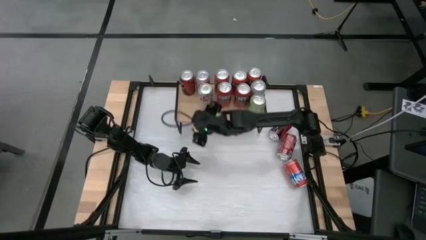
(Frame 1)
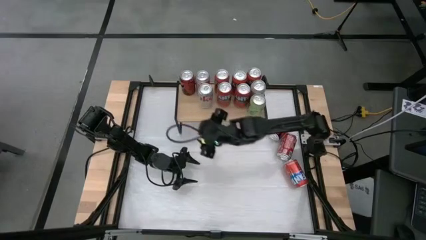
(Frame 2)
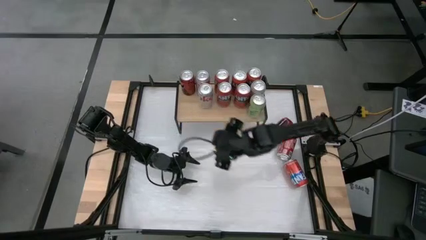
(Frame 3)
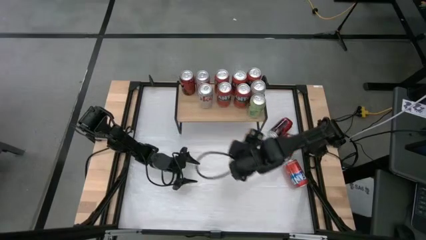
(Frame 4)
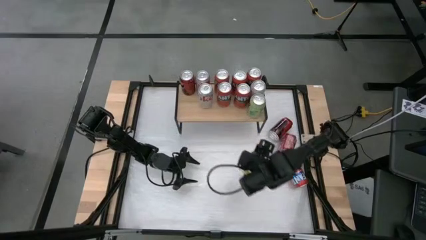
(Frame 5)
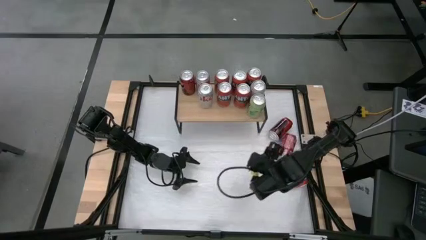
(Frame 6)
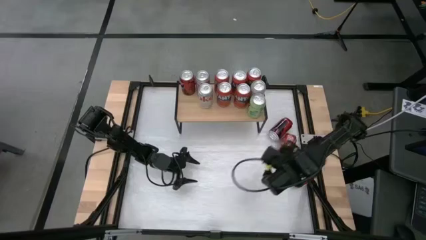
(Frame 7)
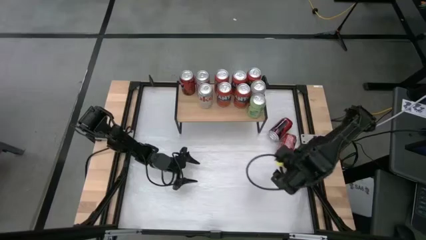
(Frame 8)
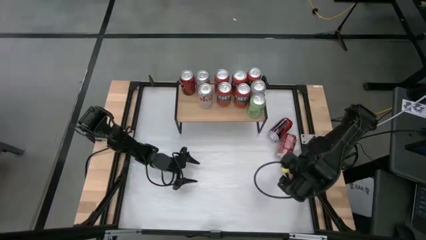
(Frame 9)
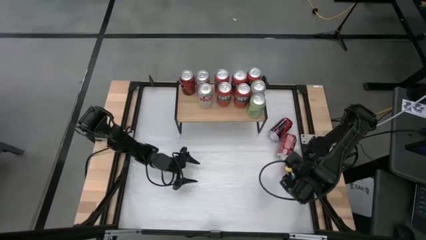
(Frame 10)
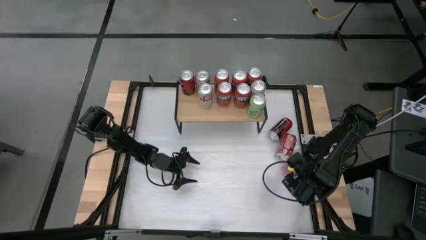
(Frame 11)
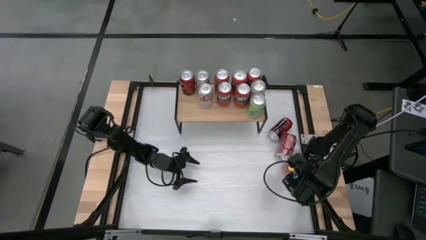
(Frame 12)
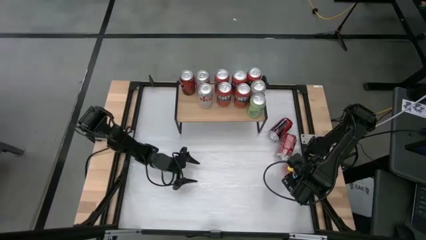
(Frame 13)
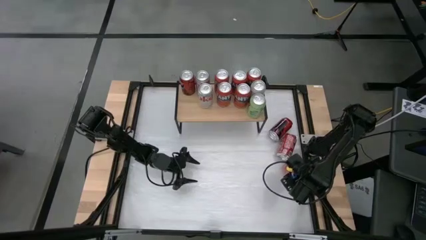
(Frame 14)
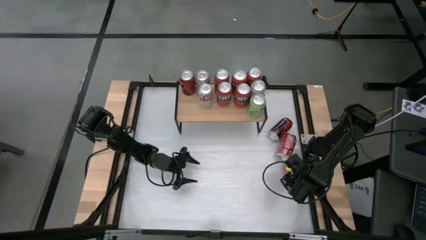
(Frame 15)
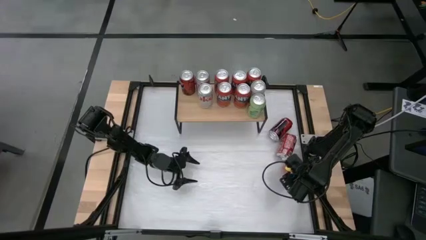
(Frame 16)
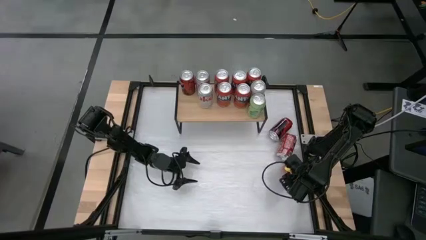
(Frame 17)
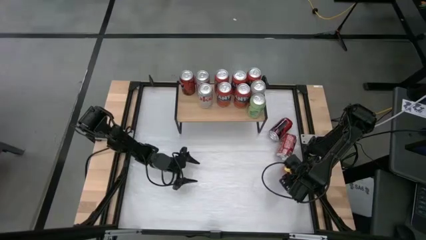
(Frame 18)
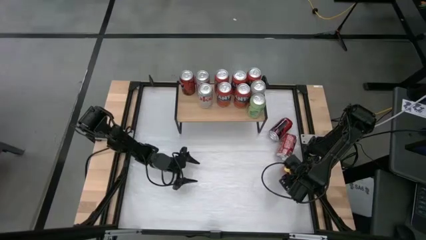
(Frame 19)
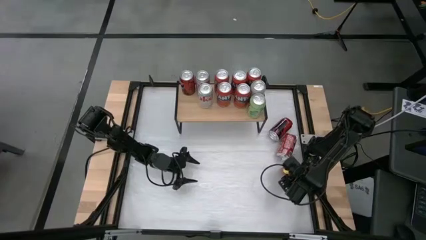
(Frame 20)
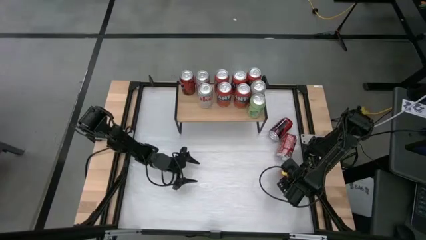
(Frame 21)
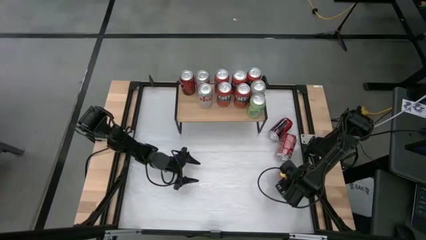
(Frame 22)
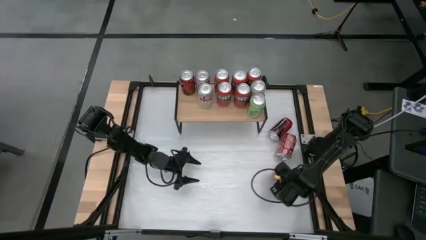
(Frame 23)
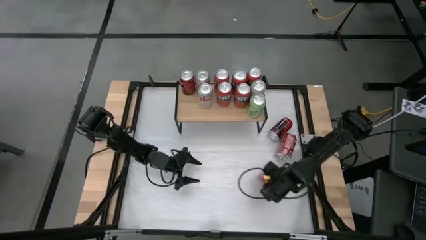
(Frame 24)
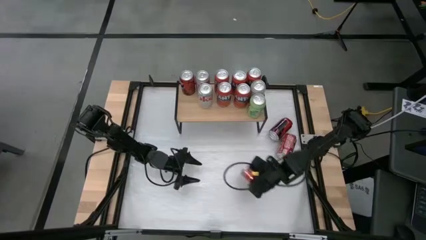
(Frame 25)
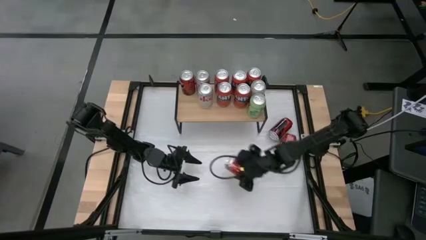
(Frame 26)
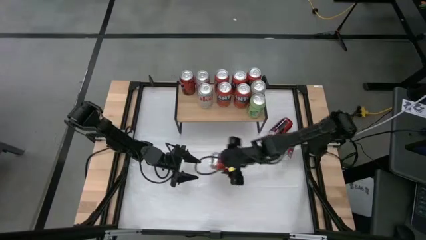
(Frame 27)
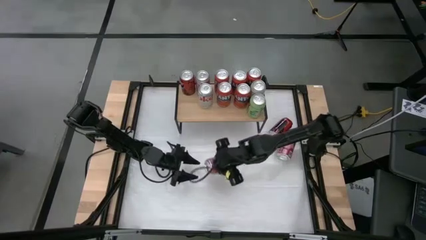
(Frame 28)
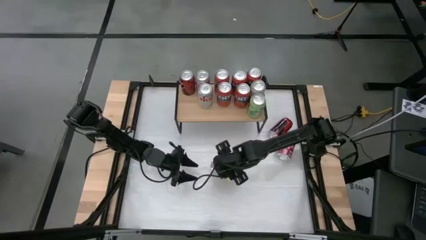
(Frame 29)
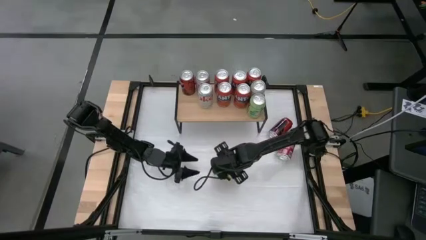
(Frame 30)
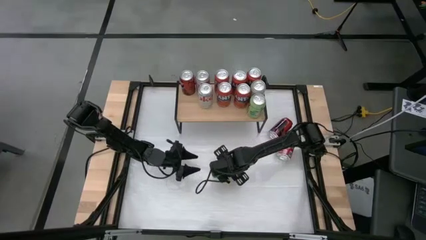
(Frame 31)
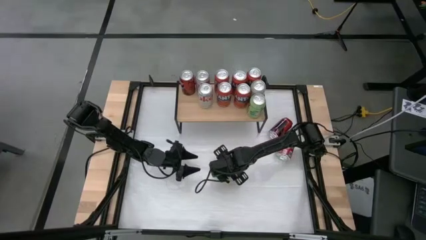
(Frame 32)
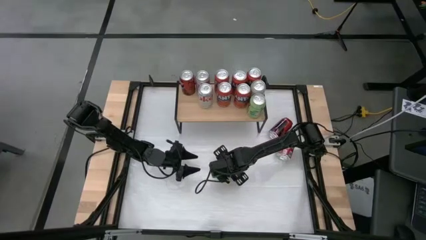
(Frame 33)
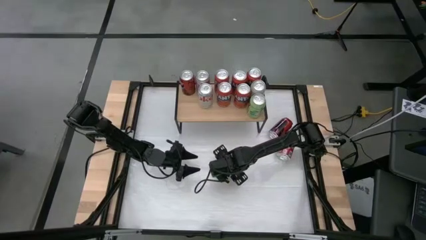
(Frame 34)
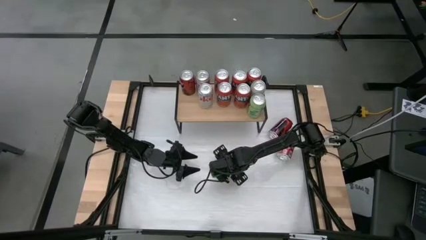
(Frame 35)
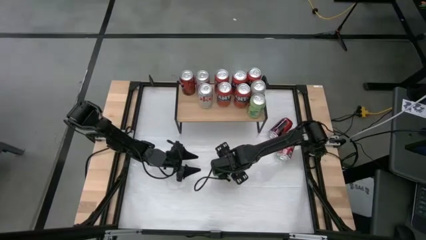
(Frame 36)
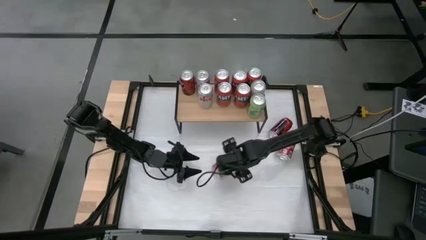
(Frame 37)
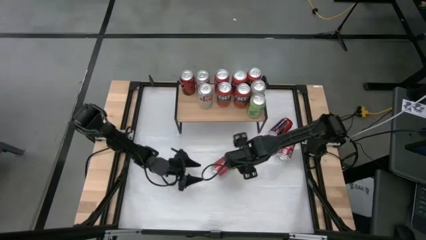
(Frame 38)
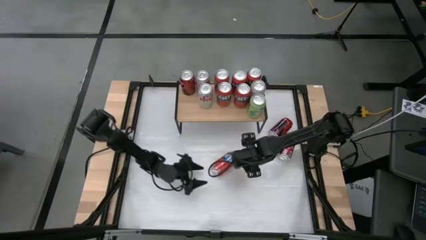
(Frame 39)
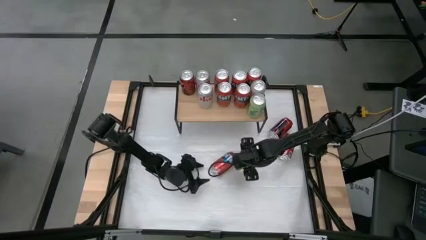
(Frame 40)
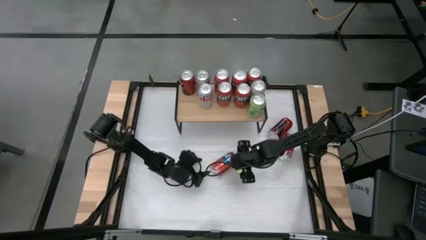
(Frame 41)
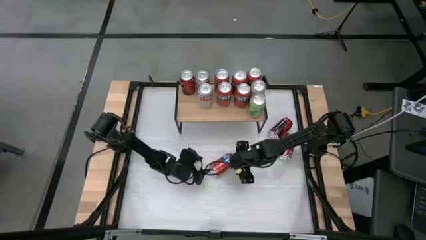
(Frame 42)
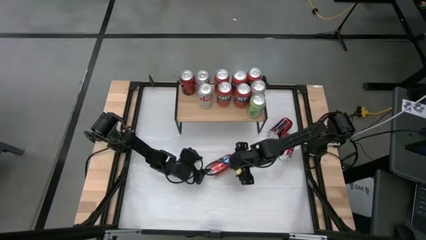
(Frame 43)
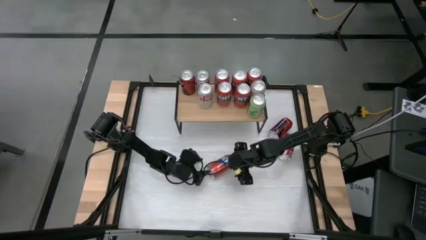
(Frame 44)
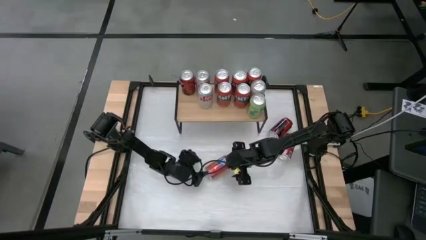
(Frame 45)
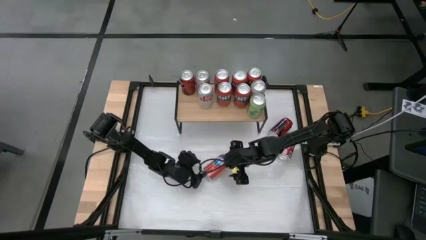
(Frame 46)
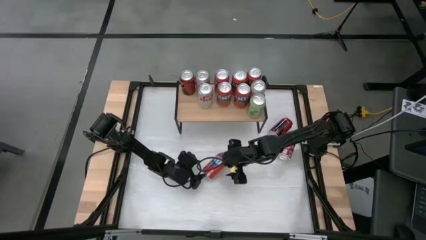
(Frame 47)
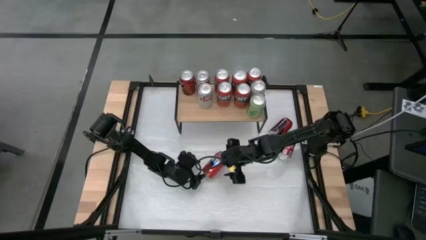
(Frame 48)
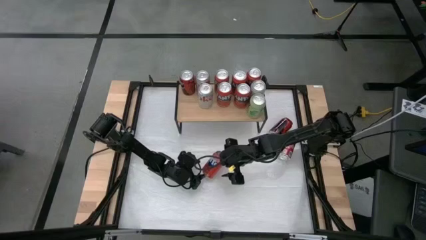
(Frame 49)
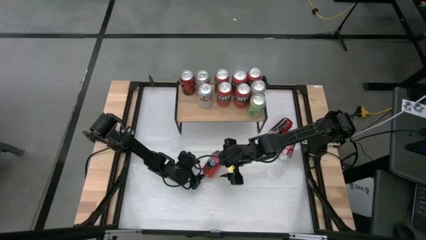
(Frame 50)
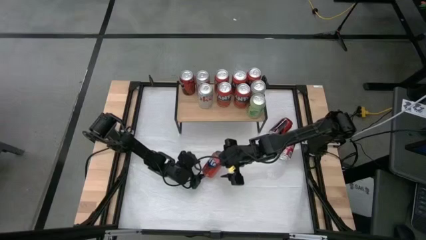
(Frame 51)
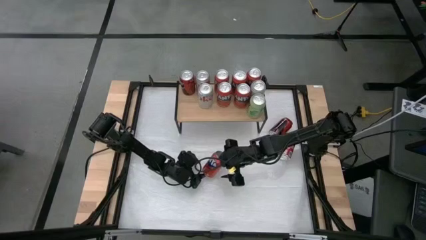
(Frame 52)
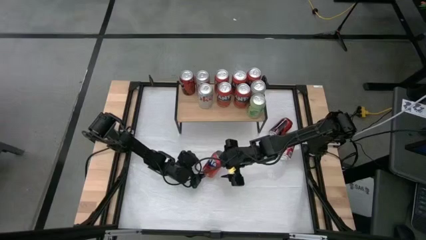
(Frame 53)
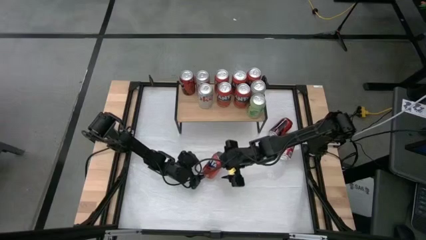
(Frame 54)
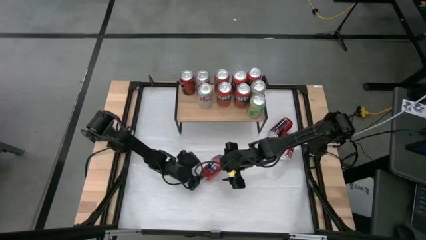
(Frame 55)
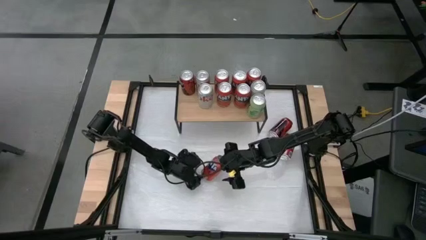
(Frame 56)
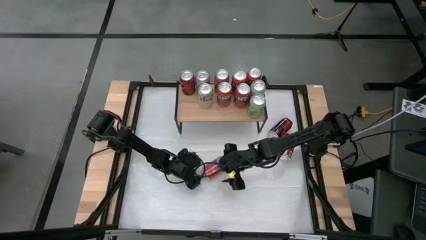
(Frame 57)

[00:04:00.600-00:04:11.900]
Task: Place canned beverage on shelf
Put the orange soda can on the shelf aligned with the other soda can

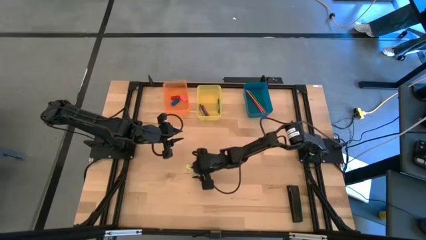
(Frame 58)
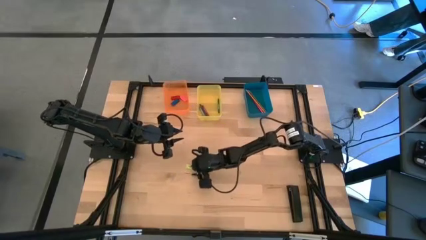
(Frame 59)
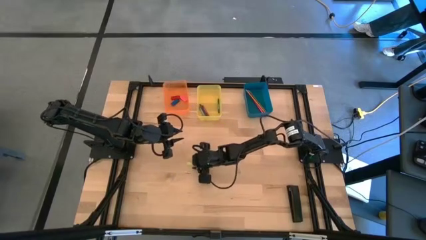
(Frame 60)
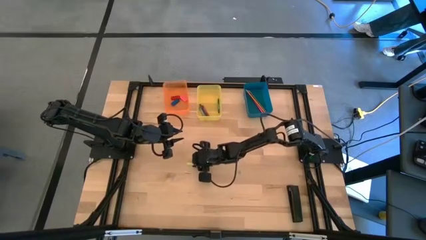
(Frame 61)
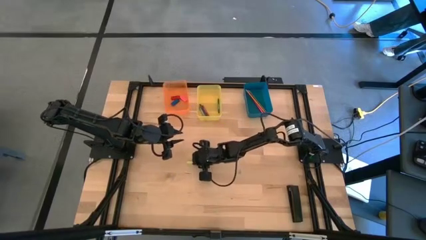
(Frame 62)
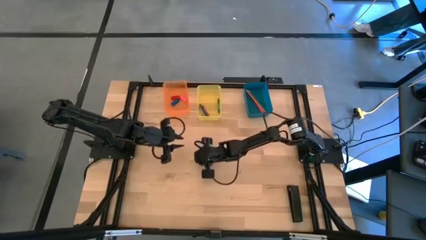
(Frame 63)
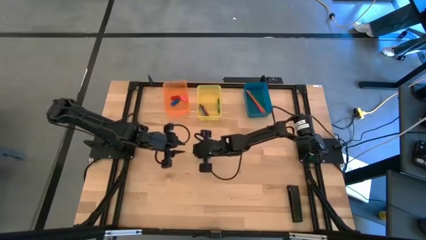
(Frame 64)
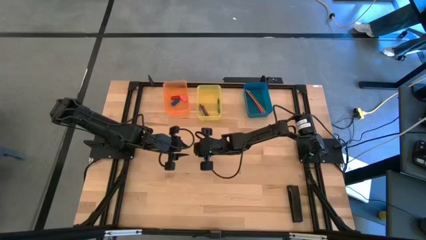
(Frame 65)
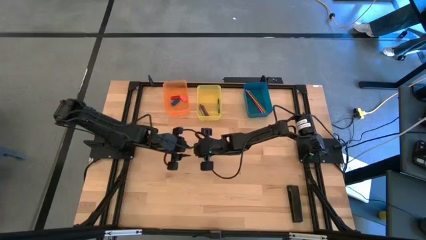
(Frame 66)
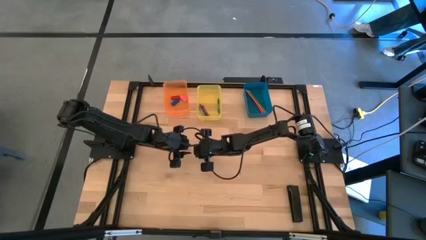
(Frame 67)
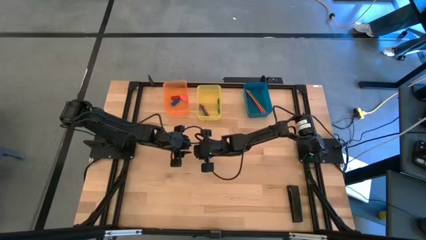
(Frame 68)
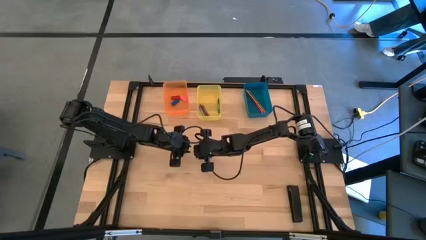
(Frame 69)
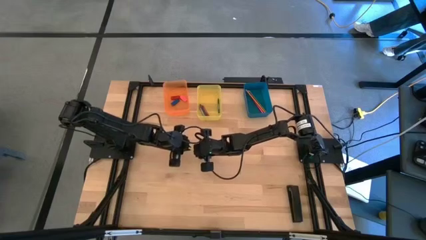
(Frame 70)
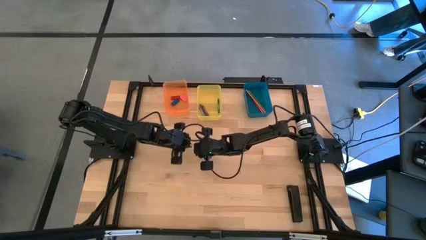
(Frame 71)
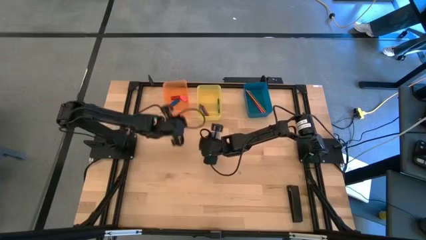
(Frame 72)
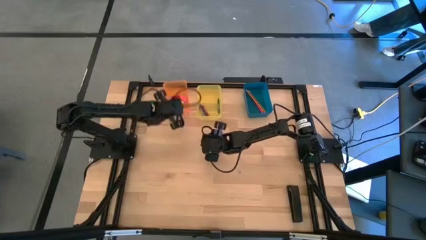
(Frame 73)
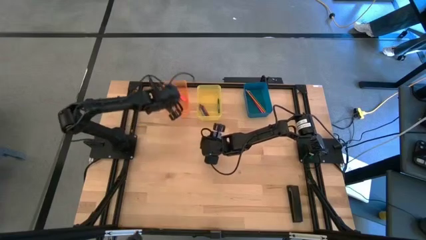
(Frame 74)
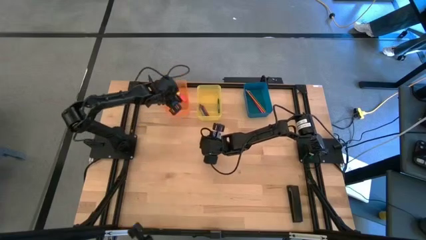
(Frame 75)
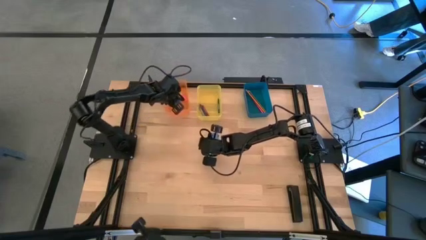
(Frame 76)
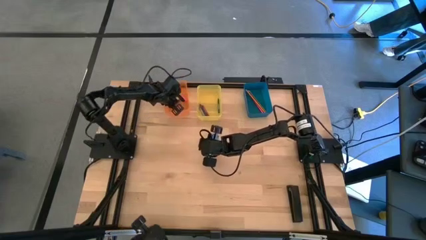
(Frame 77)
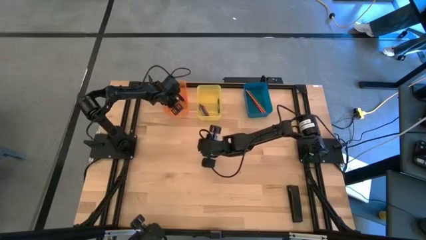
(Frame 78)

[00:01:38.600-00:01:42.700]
Task: Sort crayons/erasers/pens/pencils in bins
Put the yellow eraser into the orange bin
